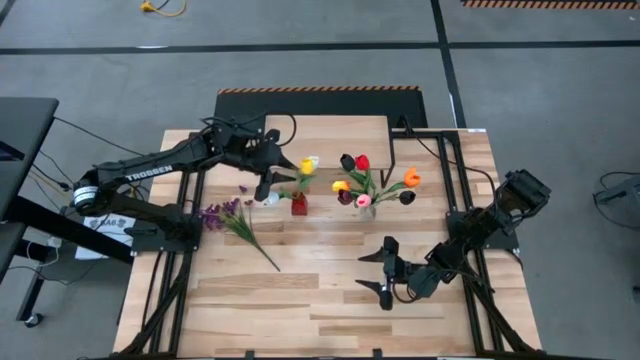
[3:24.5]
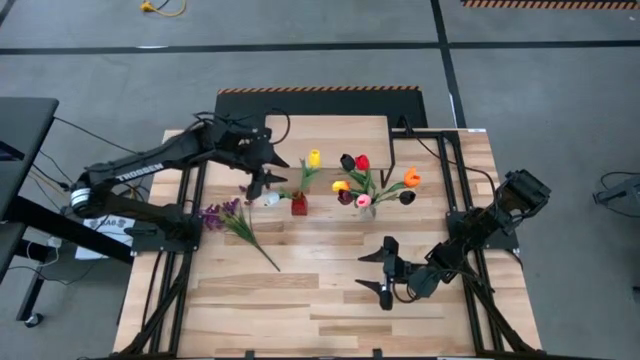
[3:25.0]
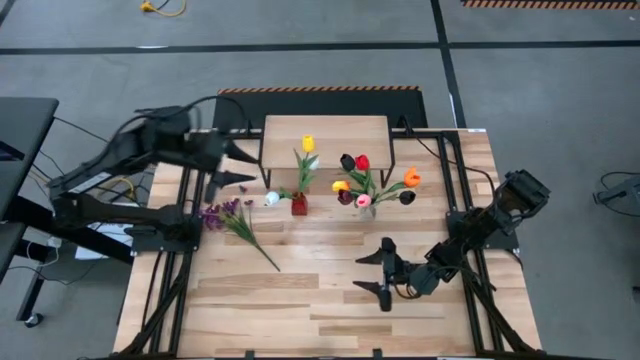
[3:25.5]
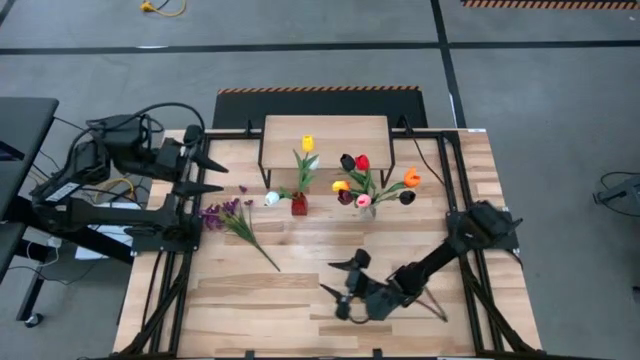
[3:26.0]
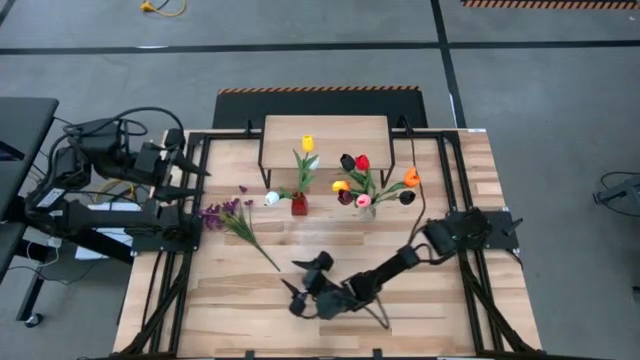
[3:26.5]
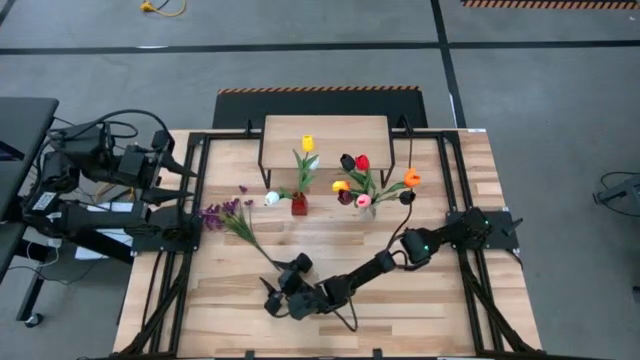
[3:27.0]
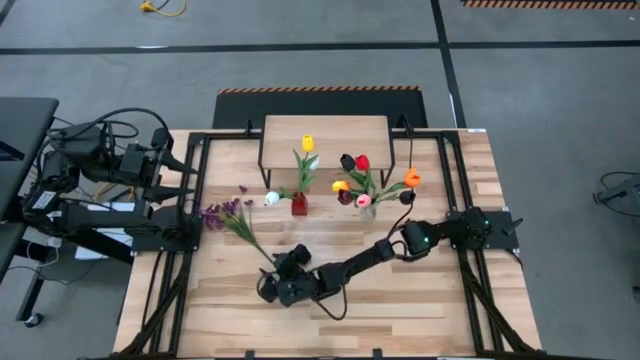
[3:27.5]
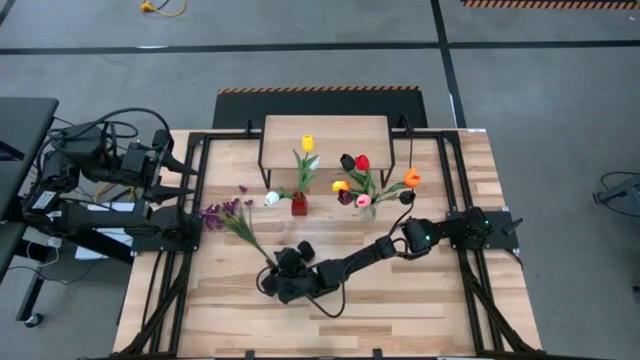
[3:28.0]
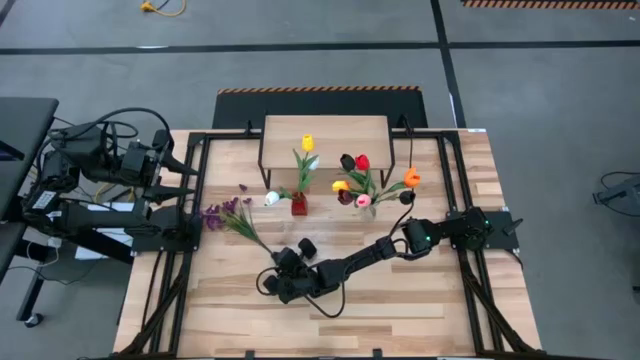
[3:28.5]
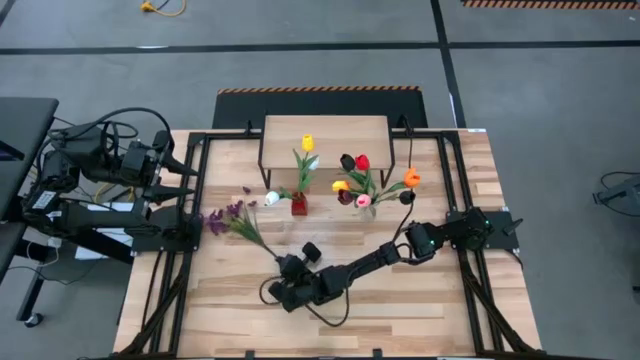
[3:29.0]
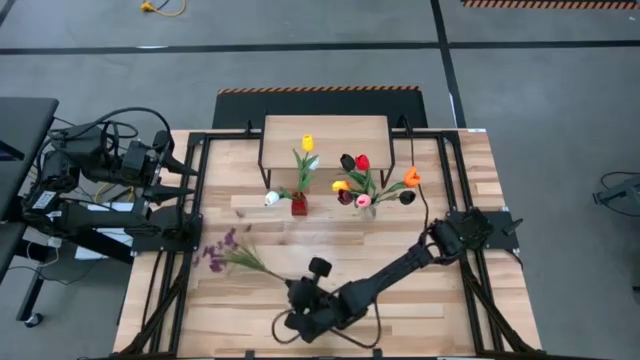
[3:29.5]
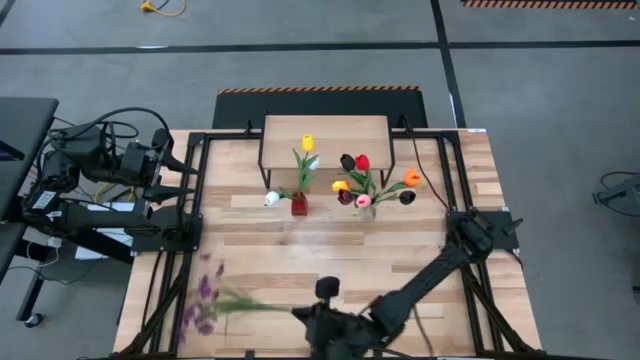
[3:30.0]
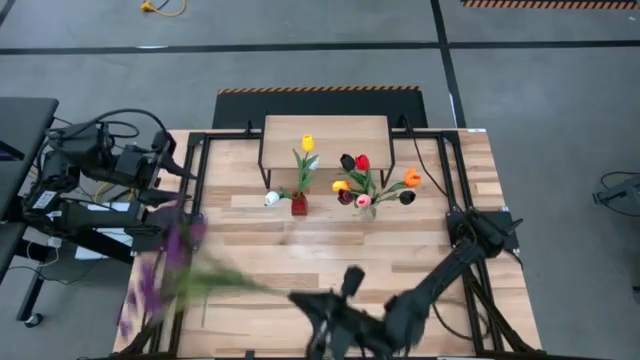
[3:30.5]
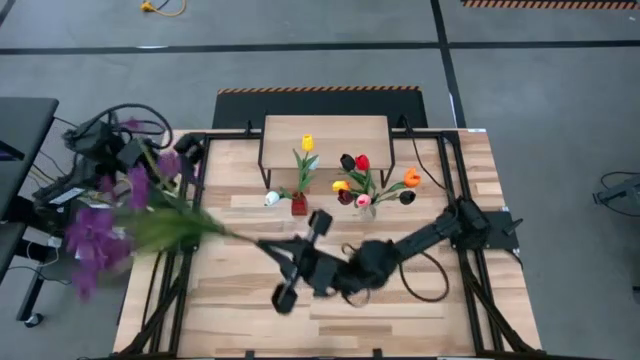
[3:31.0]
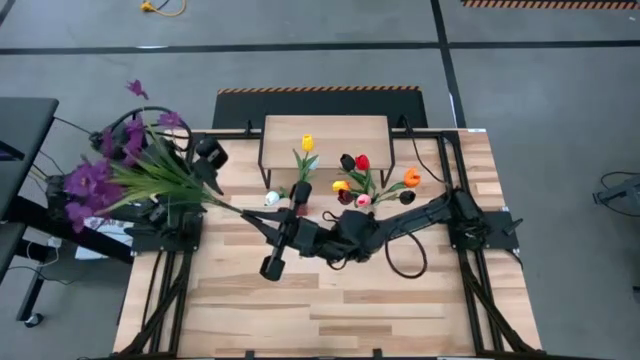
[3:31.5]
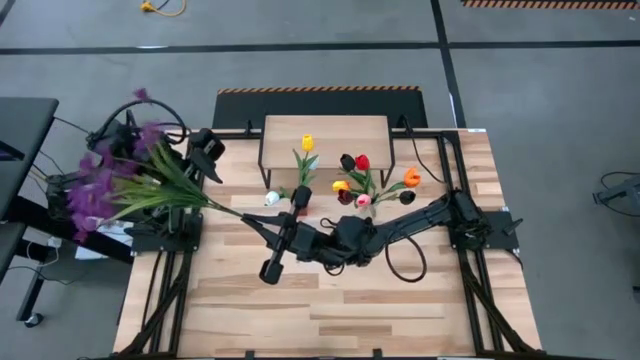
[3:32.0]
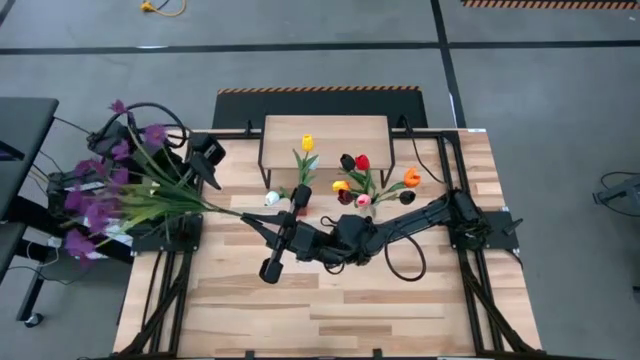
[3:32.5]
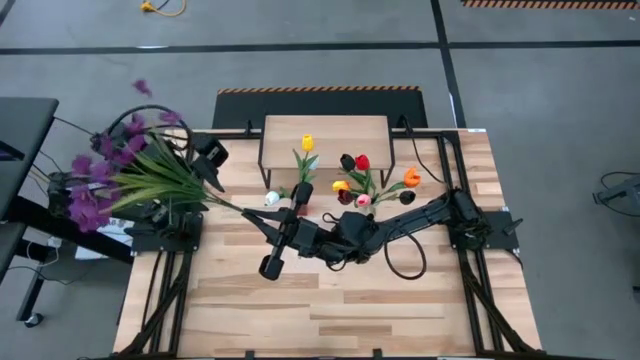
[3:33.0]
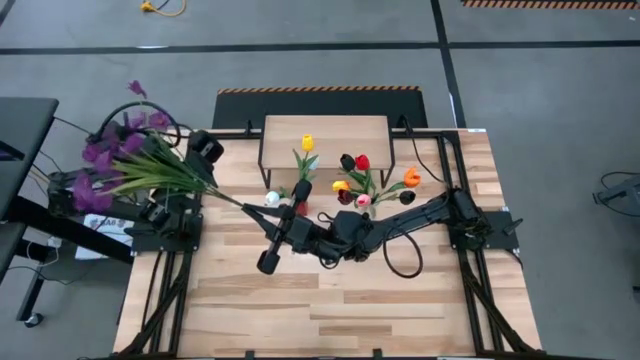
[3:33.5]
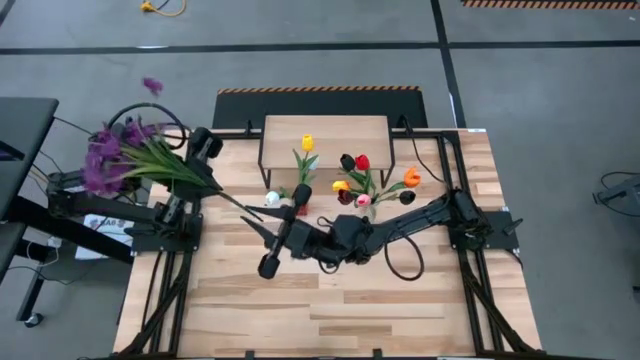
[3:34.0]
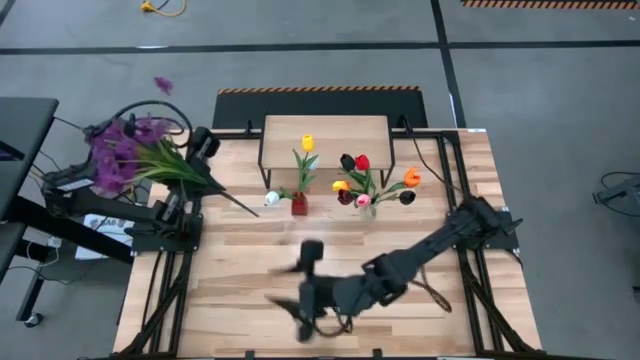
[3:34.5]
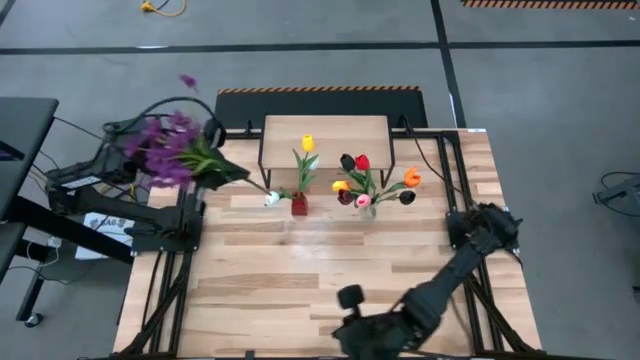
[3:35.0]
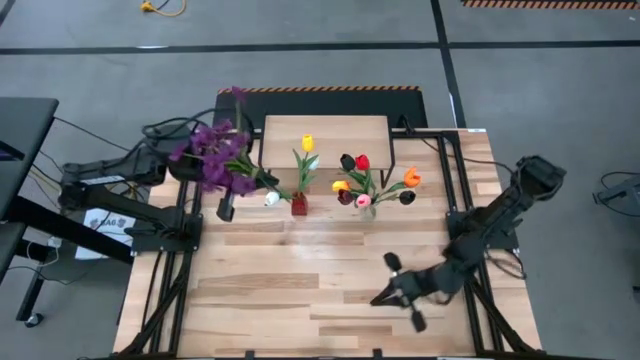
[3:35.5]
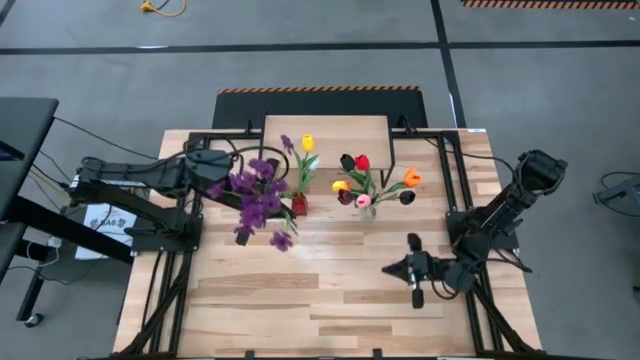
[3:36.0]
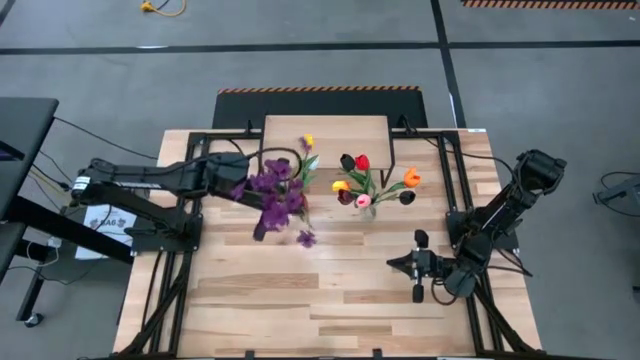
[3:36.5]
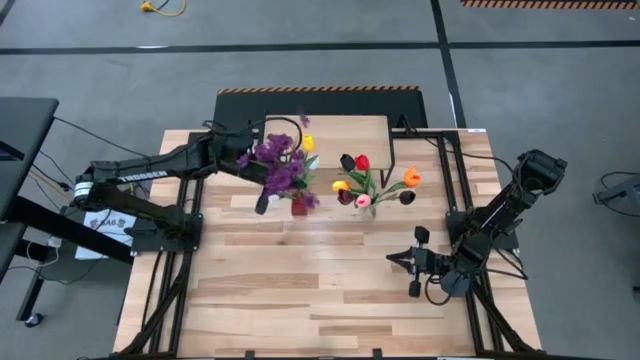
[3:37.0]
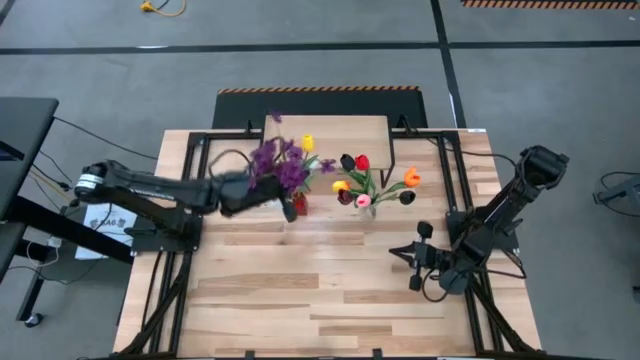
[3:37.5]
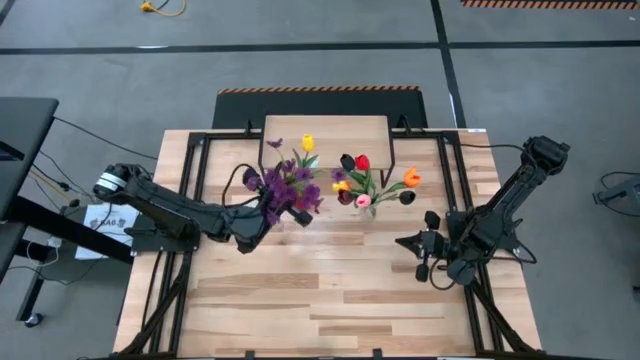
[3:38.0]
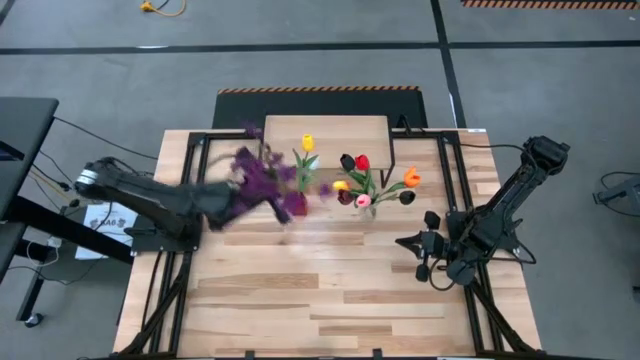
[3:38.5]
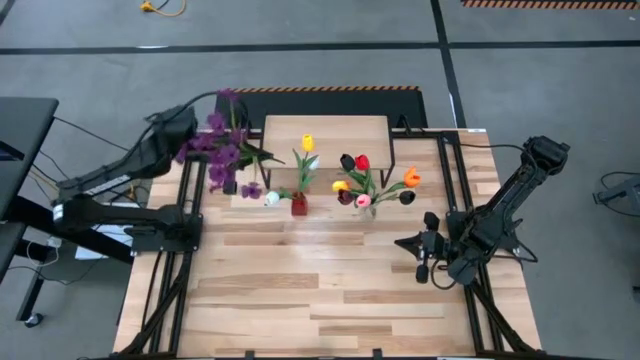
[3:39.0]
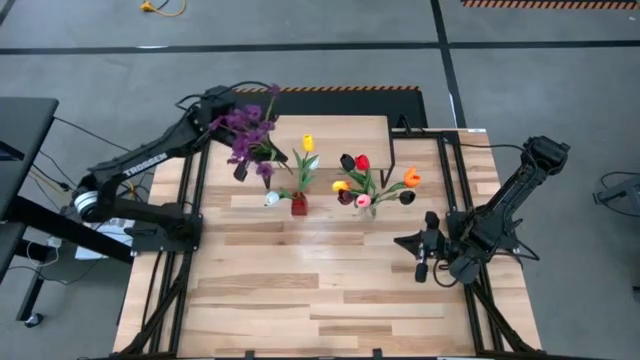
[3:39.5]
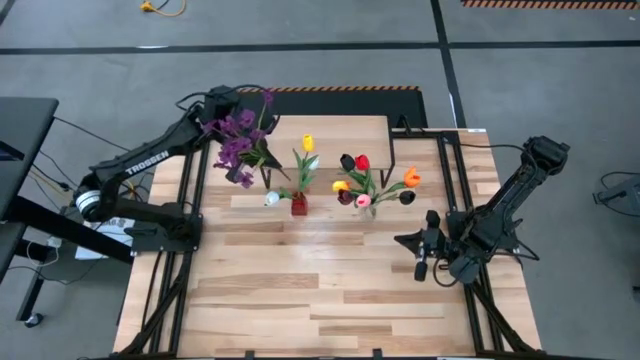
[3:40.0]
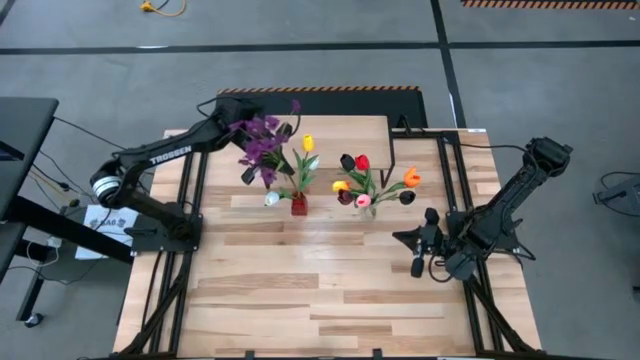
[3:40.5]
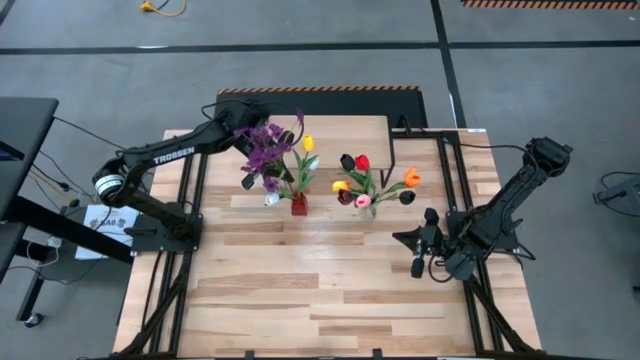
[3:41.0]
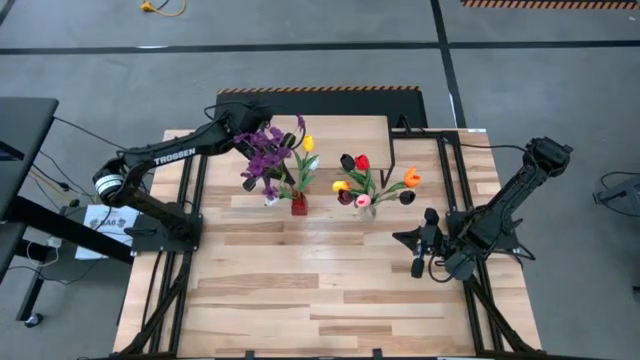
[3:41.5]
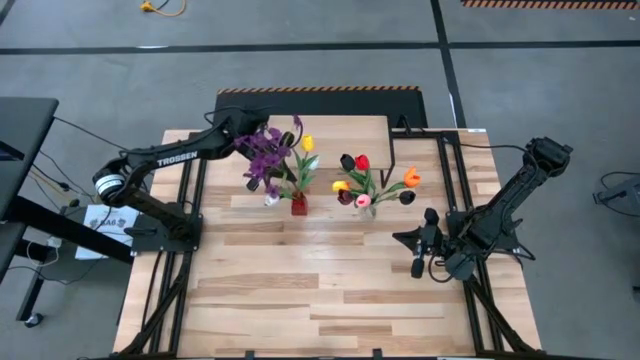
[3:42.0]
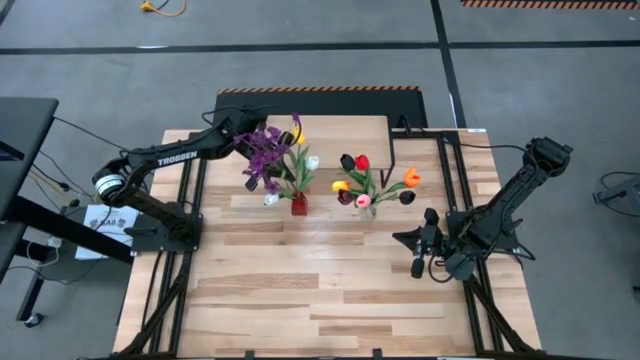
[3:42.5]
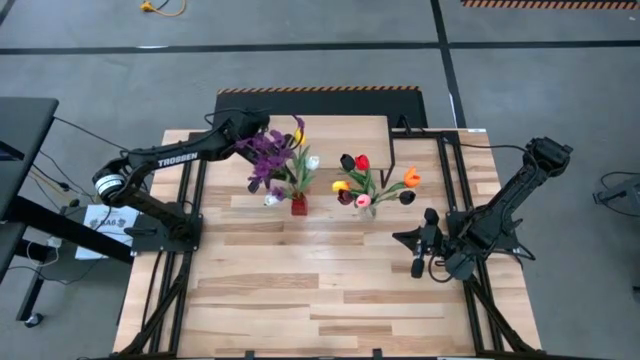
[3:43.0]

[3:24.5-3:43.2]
Task: Pick and place flowers into a vace then onto a shelf
Put the purple flower into the red vase
